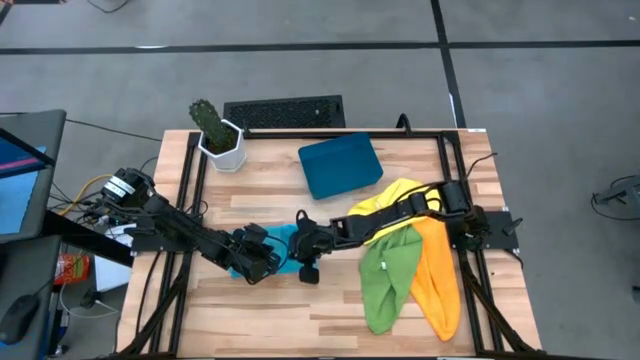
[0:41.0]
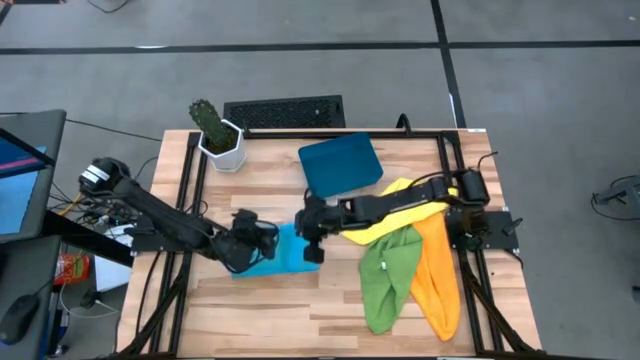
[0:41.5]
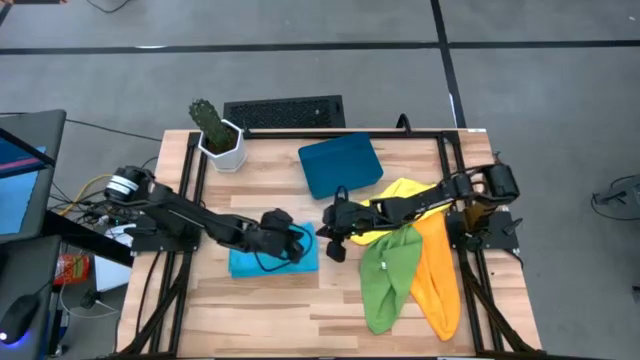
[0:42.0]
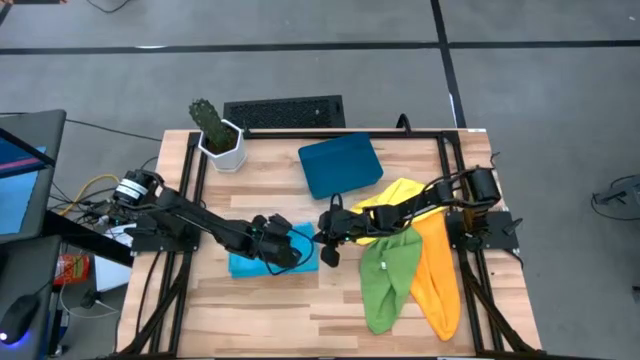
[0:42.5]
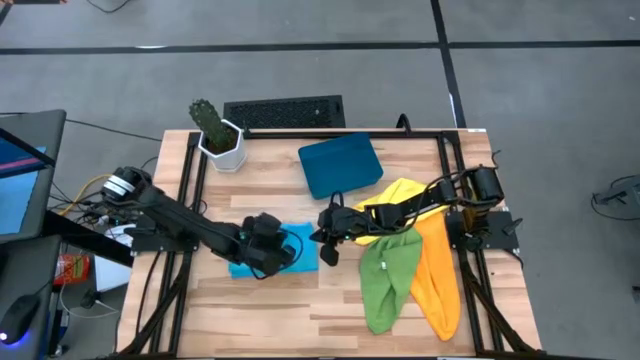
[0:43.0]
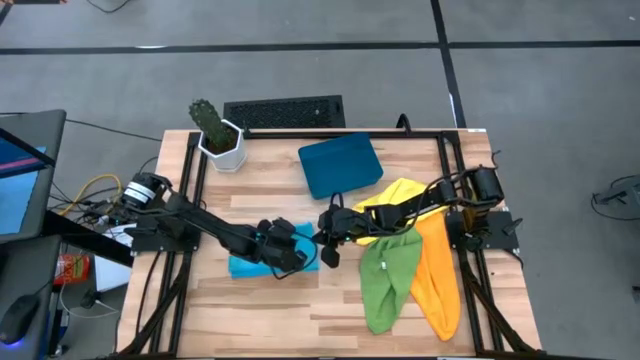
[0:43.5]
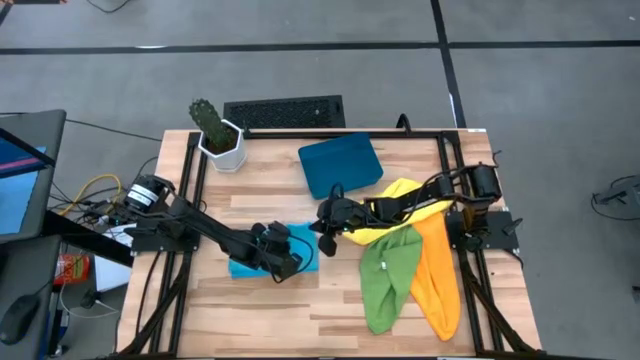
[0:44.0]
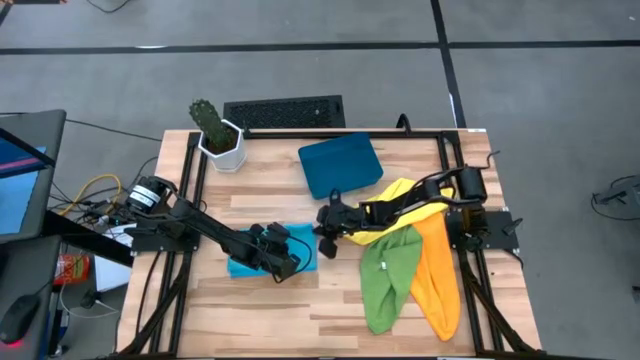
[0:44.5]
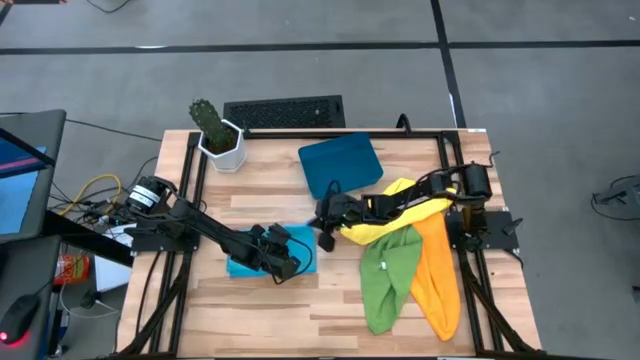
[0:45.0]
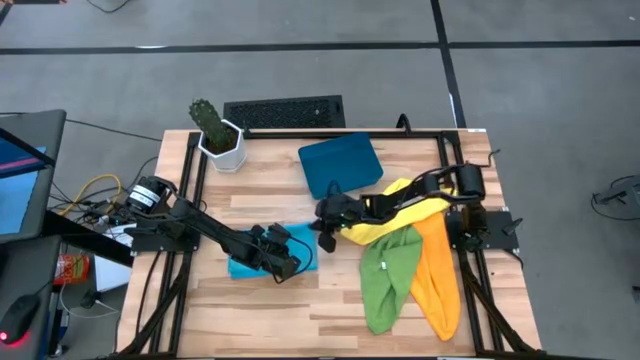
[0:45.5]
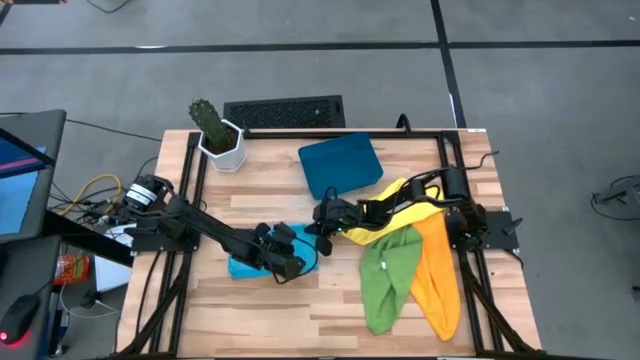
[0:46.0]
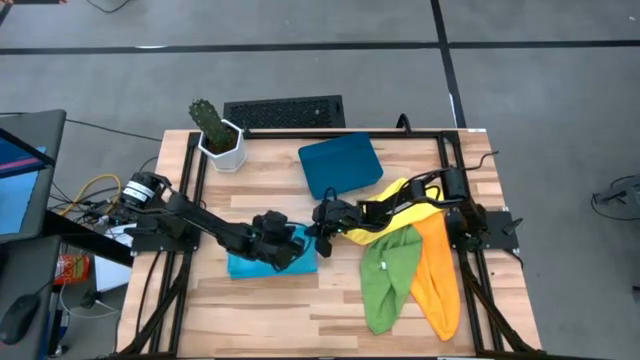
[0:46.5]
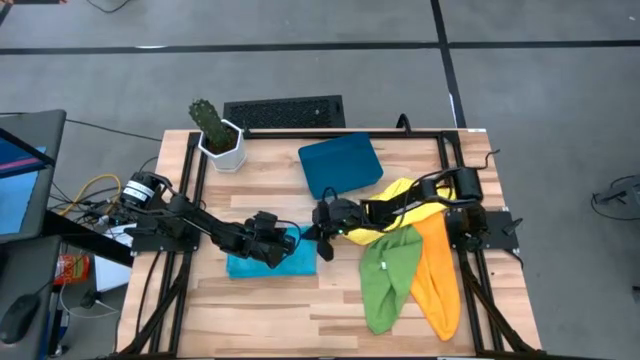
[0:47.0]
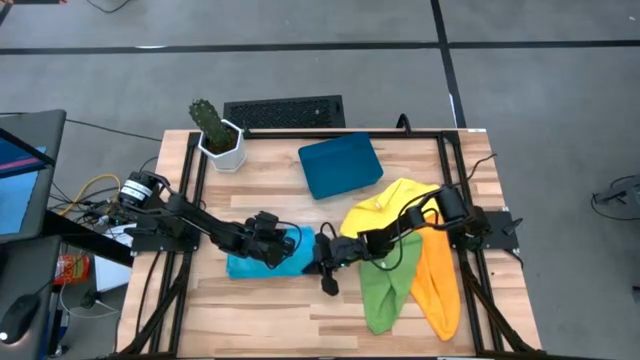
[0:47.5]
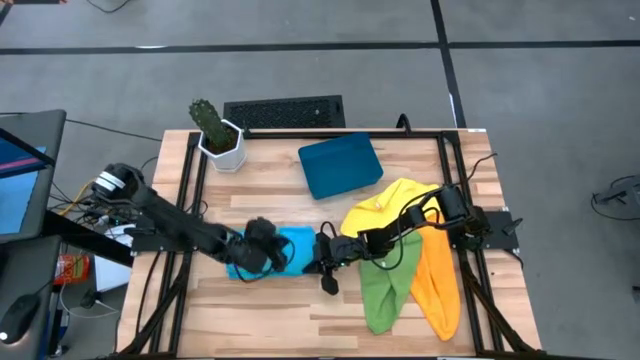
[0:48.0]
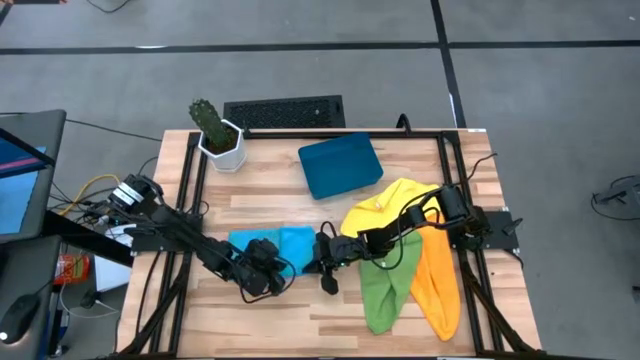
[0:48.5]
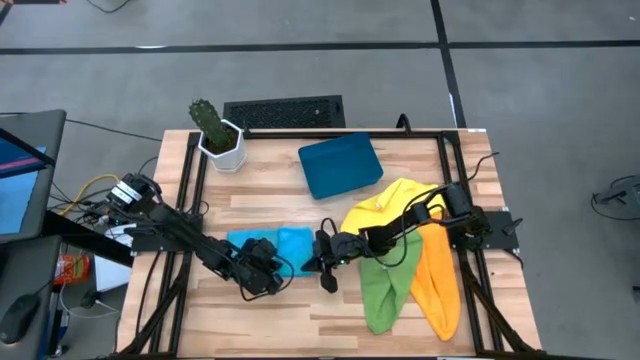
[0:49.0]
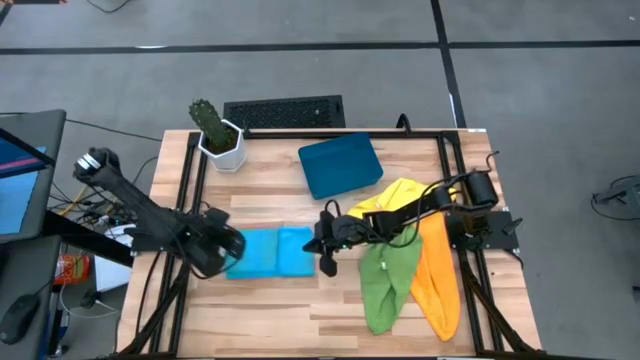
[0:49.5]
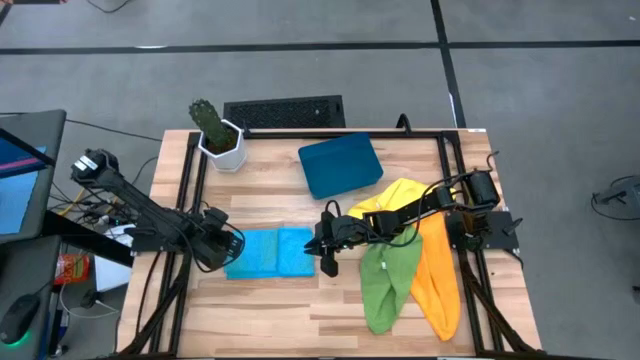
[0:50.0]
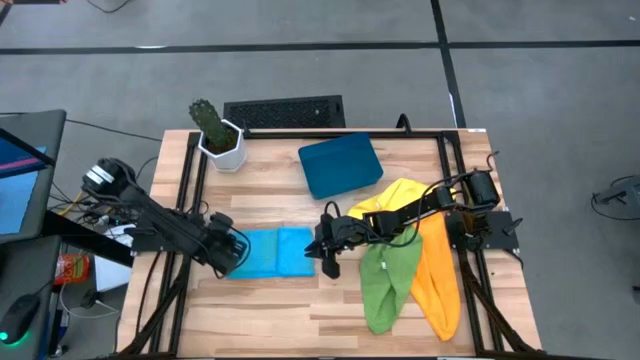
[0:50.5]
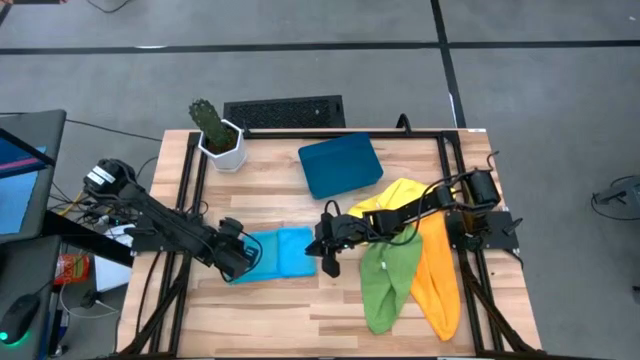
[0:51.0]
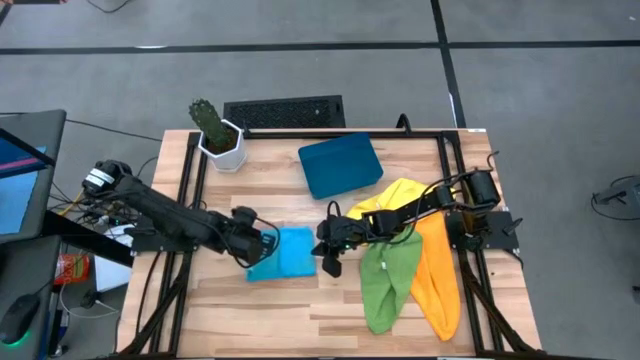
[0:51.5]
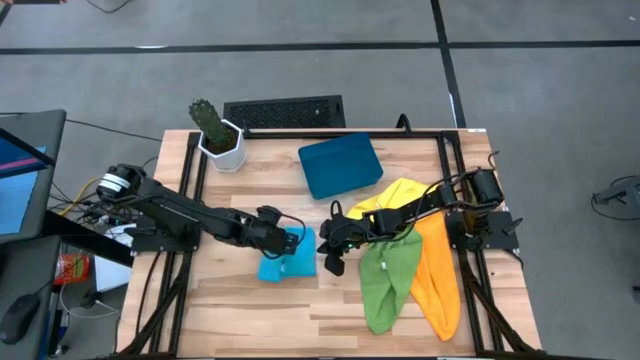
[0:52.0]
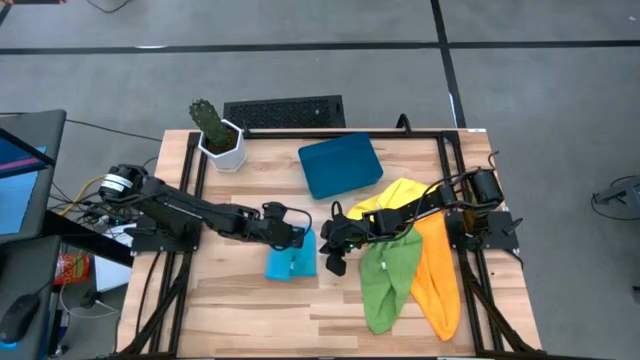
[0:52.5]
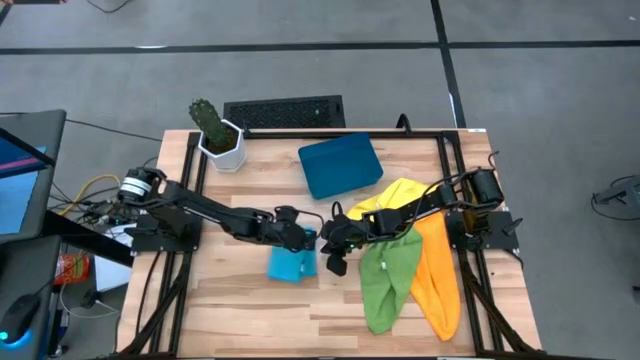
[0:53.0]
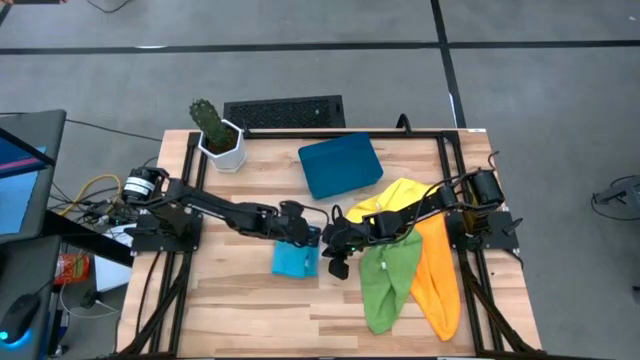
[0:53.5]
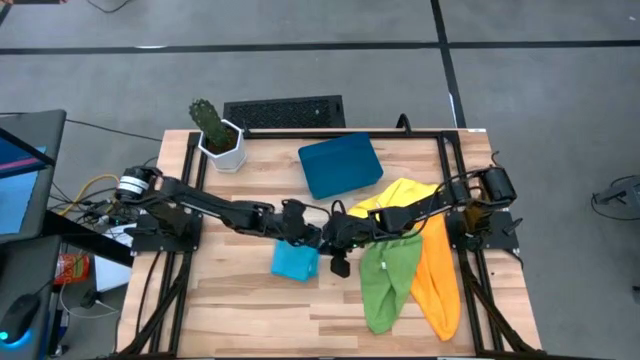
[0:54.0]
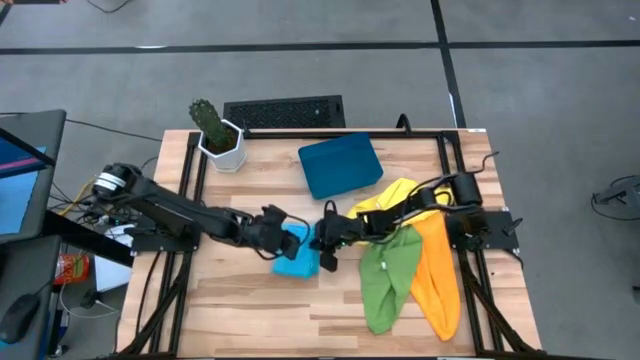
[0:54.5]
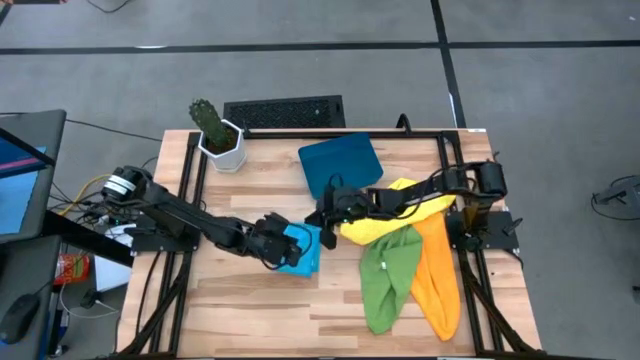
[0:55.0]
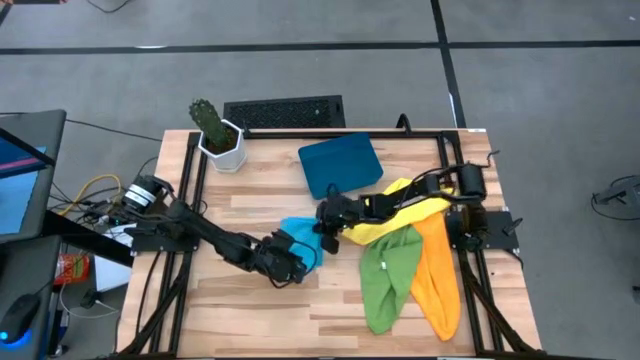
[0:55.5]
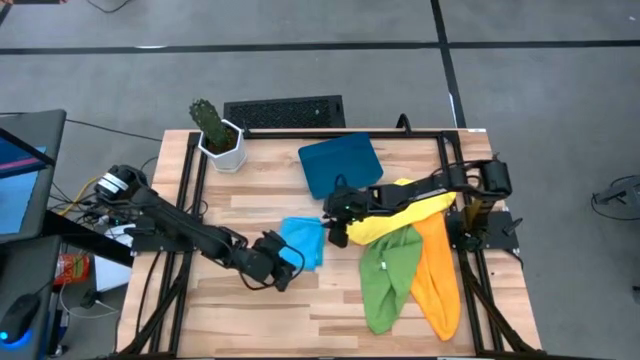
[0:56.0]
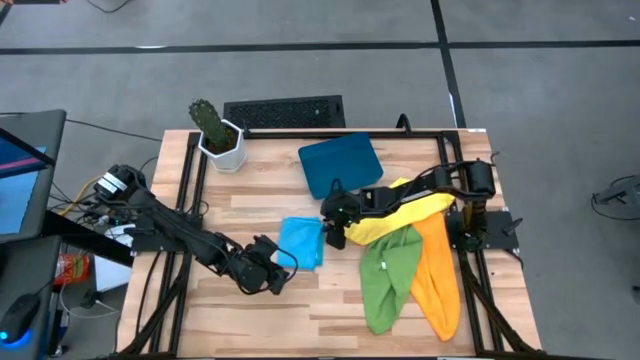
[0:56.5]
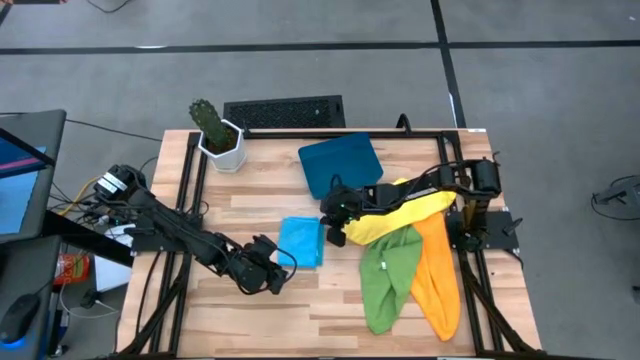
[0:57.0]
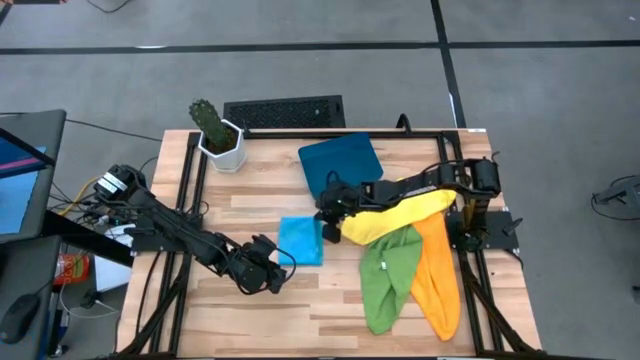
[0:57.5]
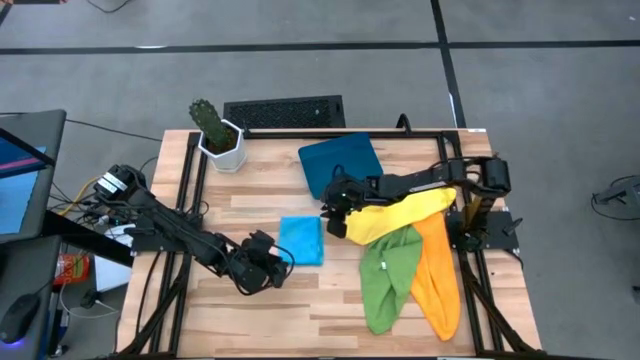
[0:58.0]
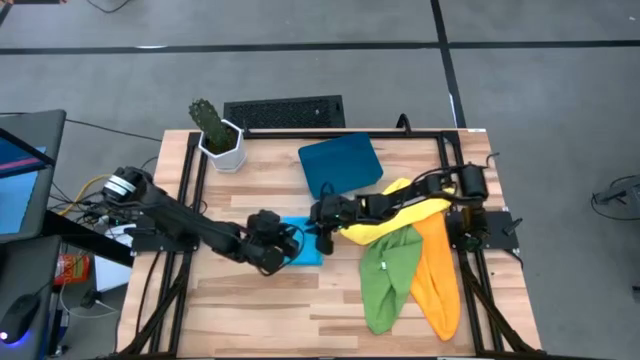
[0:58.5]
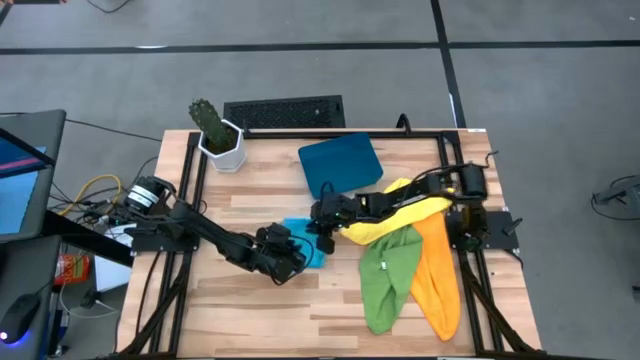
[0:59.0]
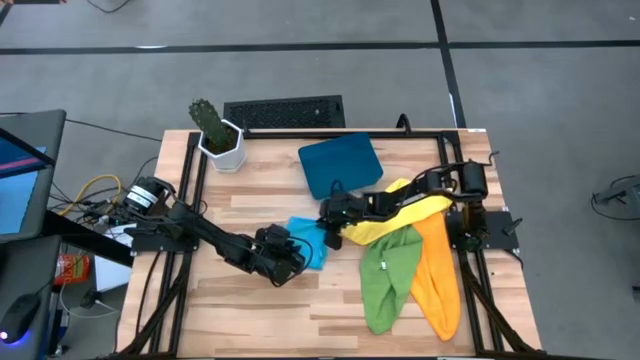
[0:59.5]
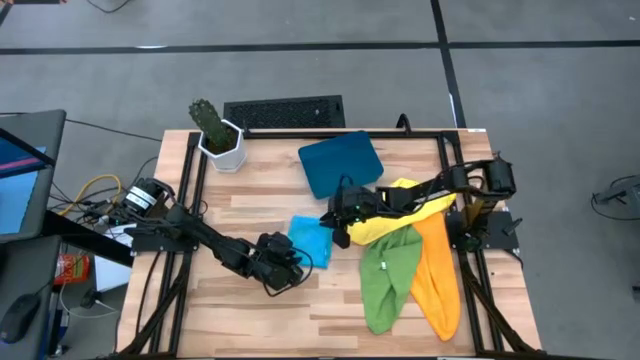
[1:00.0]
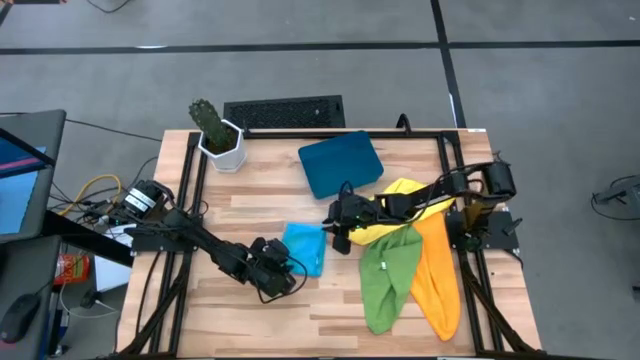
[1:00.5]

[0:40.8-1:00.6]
Task: Fold microfiber towels
Fold the blue microfiber cloth

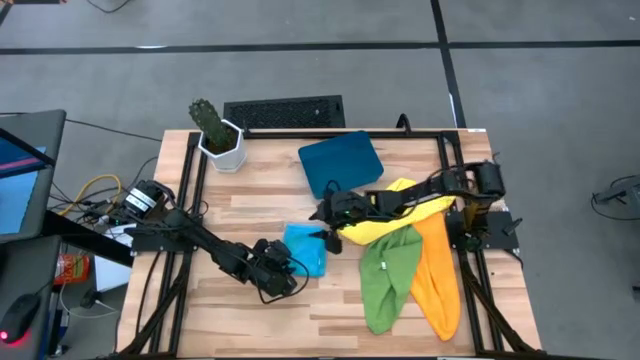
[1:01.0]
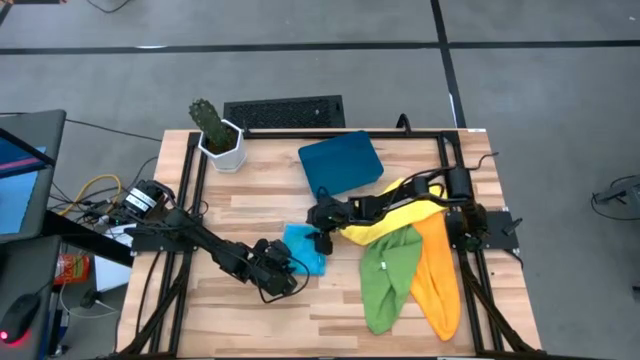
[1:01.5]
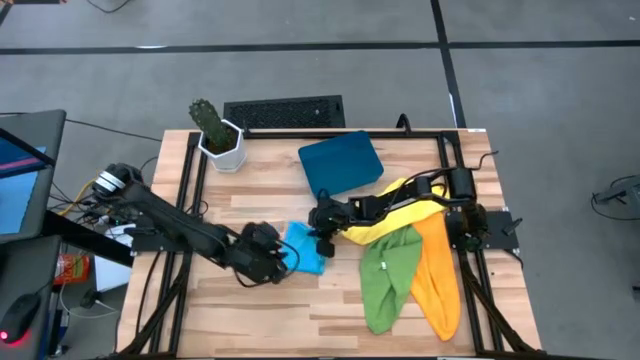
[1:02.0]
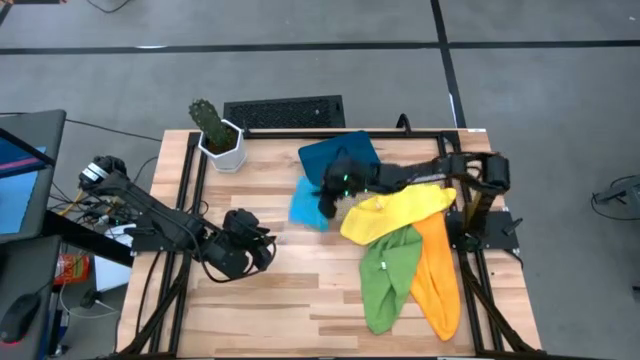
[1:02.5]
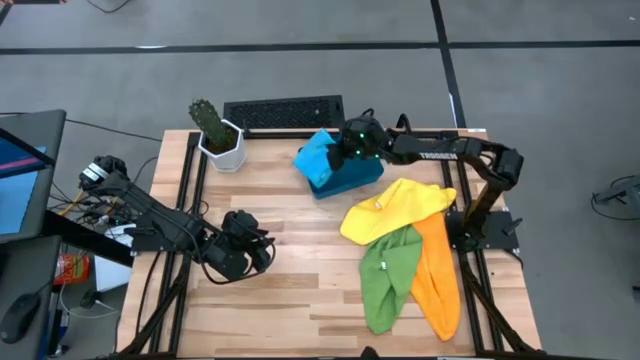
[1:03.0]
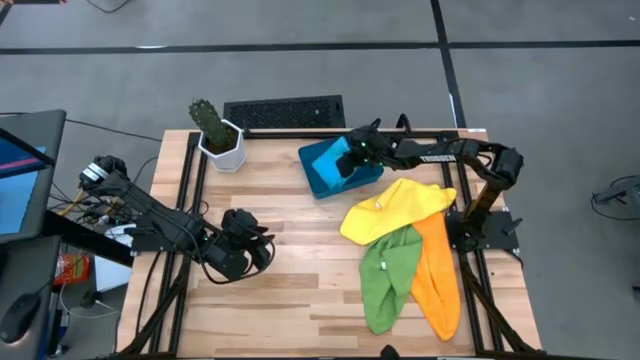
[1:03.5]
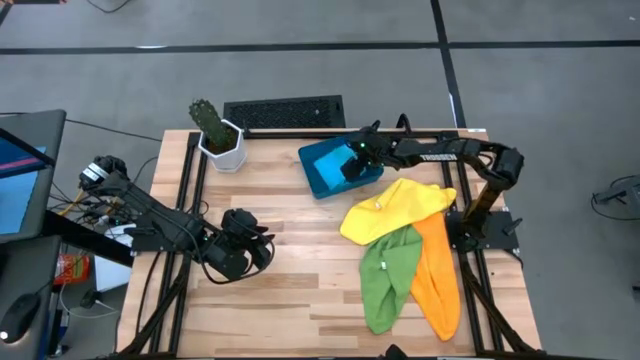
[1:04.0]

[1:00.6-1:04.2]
Put the folded blue microfiber cloth into the blue bin
